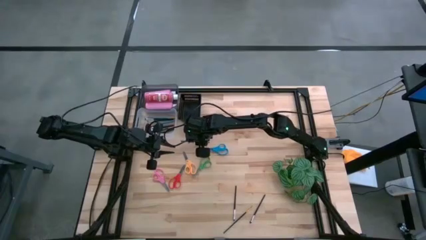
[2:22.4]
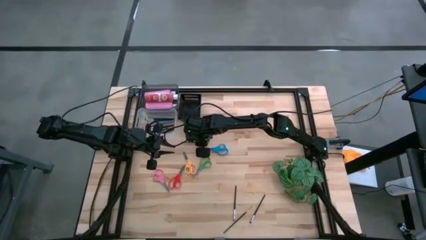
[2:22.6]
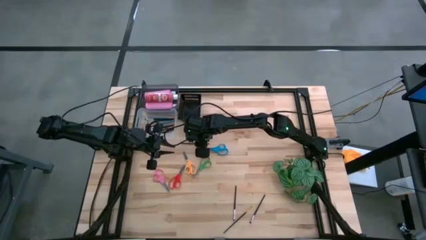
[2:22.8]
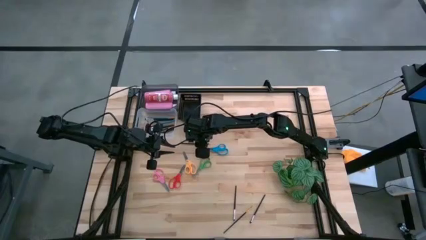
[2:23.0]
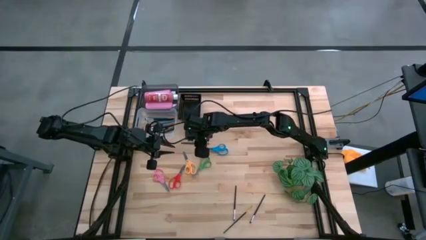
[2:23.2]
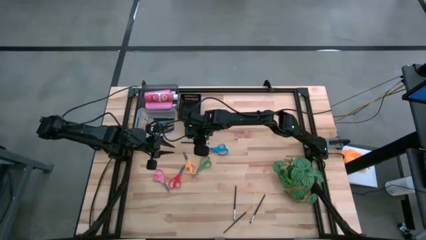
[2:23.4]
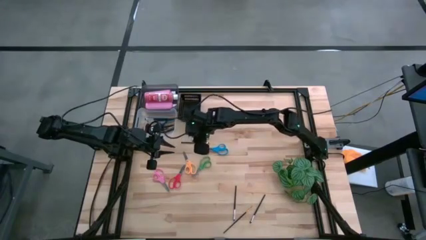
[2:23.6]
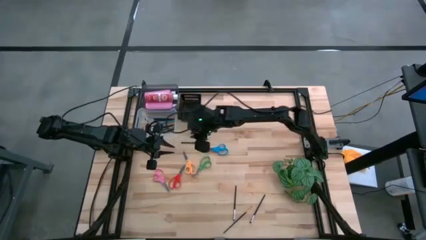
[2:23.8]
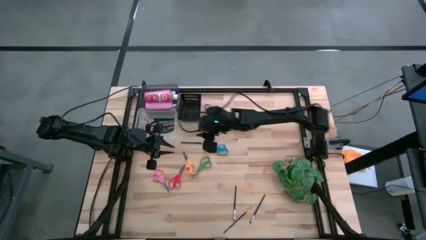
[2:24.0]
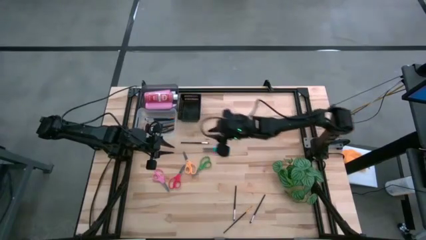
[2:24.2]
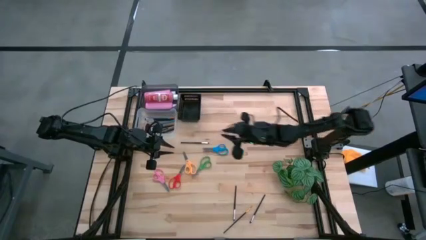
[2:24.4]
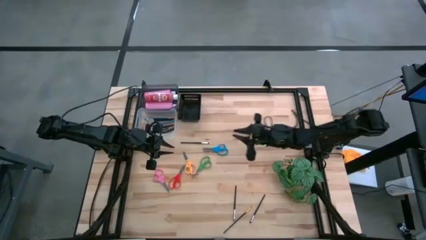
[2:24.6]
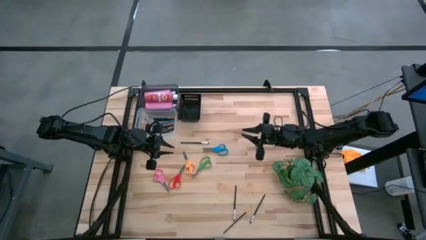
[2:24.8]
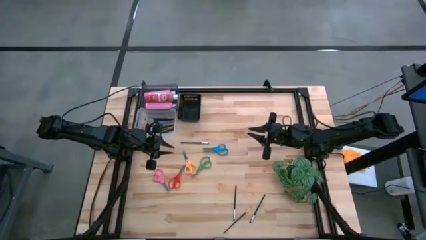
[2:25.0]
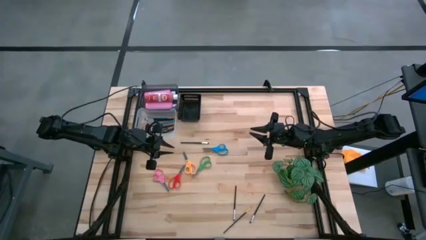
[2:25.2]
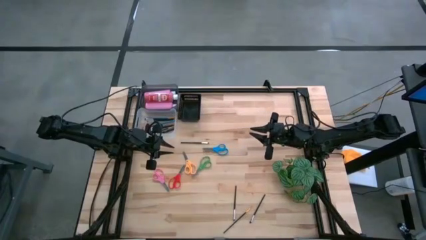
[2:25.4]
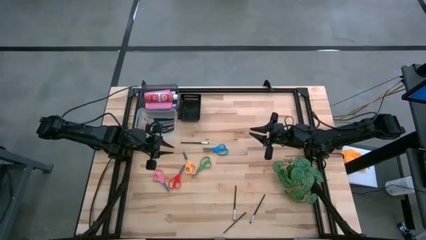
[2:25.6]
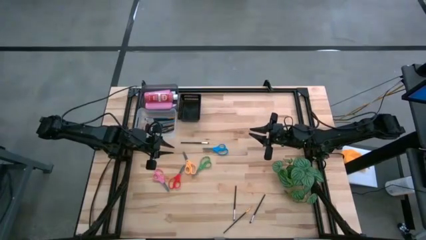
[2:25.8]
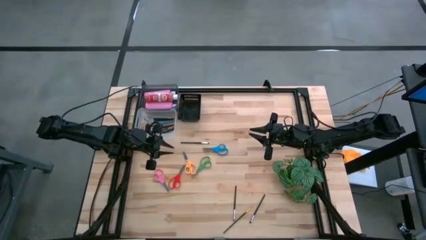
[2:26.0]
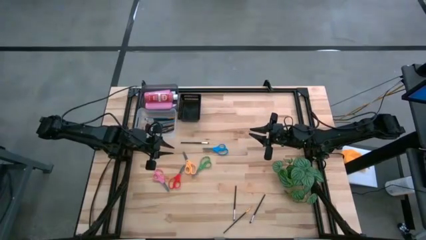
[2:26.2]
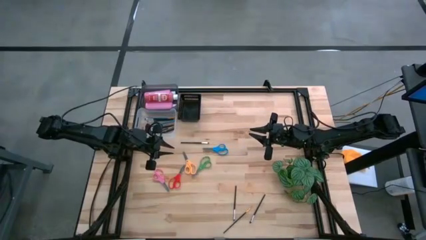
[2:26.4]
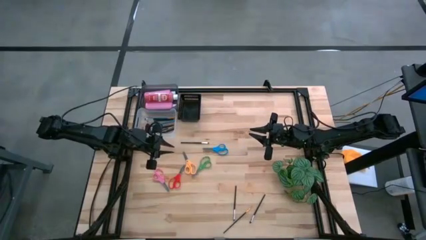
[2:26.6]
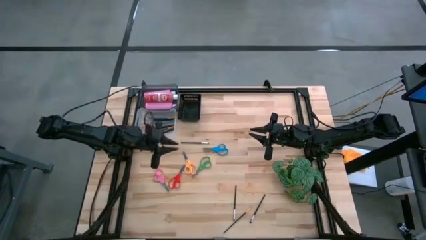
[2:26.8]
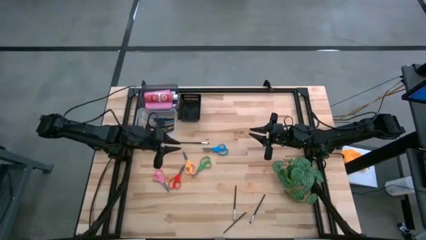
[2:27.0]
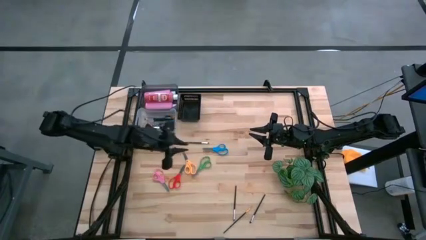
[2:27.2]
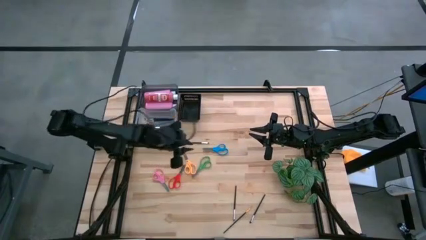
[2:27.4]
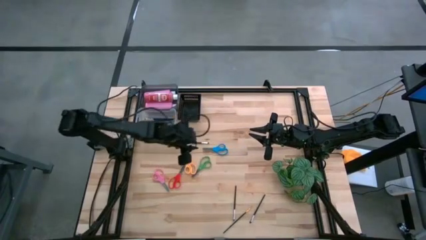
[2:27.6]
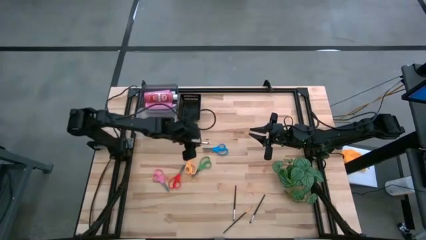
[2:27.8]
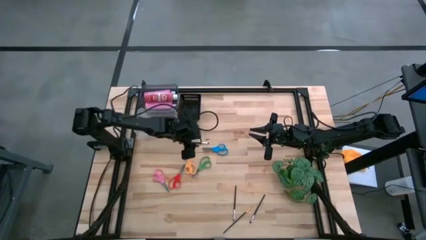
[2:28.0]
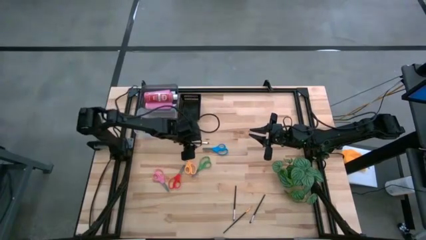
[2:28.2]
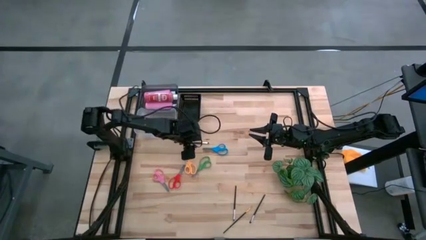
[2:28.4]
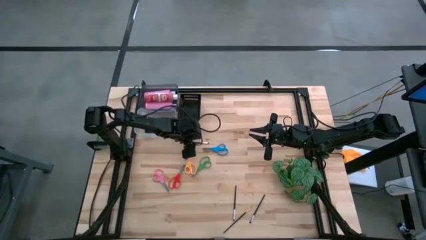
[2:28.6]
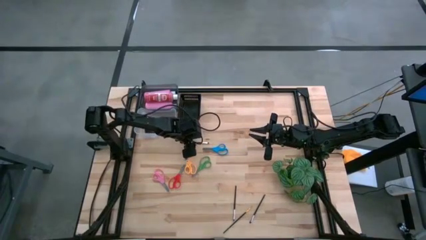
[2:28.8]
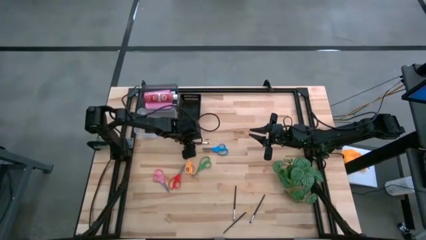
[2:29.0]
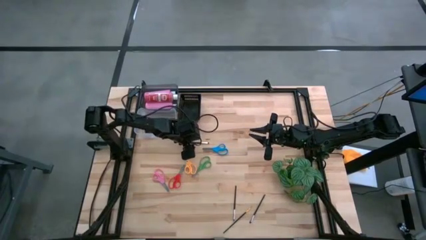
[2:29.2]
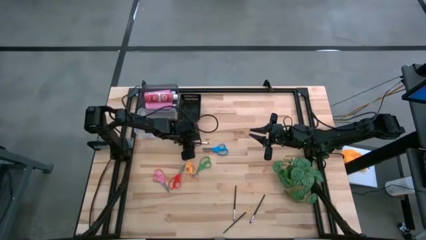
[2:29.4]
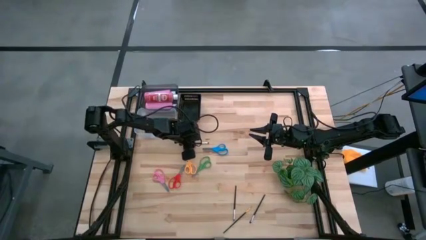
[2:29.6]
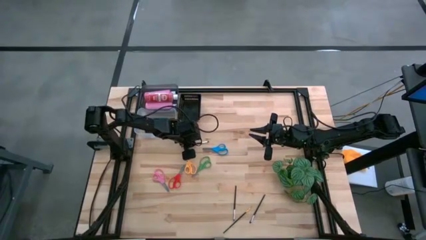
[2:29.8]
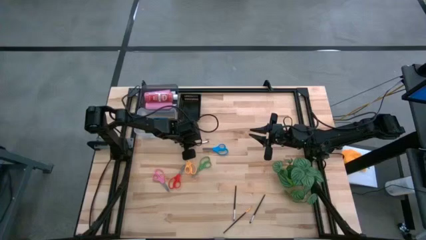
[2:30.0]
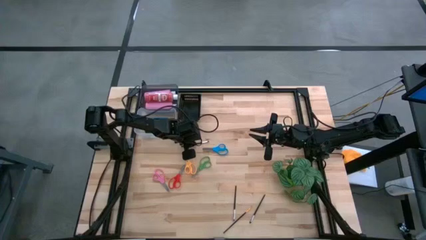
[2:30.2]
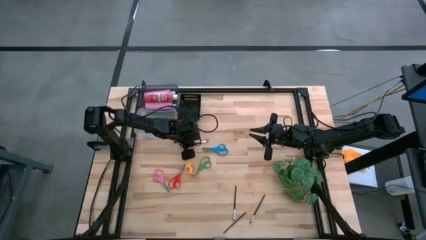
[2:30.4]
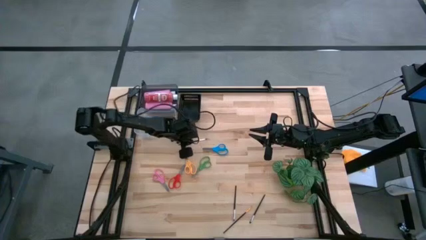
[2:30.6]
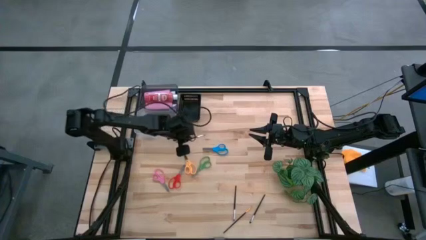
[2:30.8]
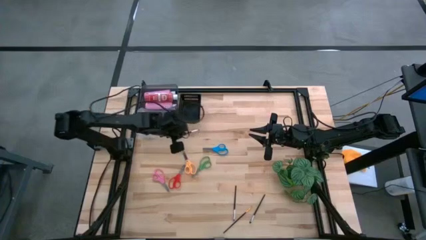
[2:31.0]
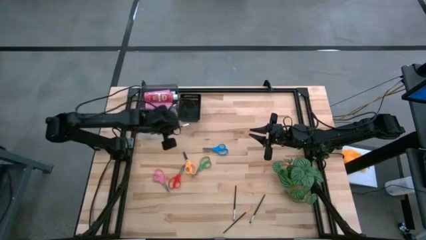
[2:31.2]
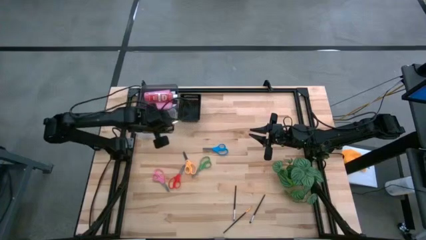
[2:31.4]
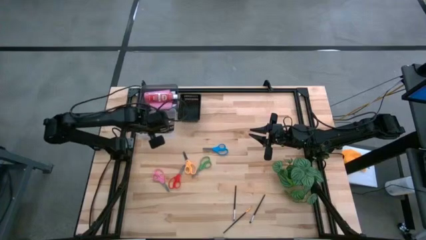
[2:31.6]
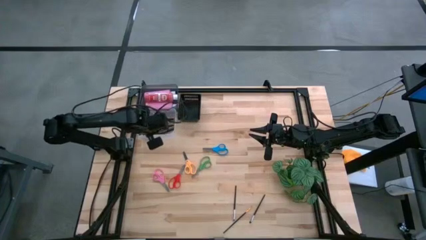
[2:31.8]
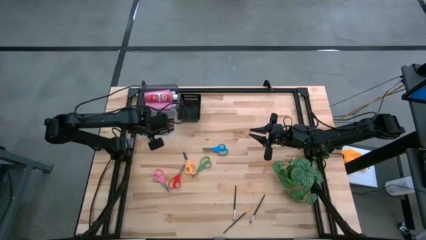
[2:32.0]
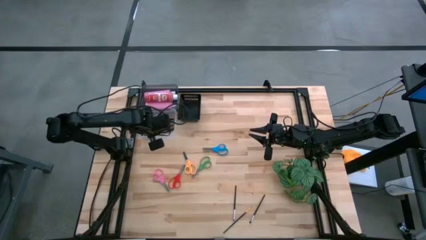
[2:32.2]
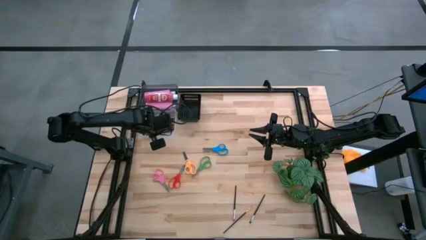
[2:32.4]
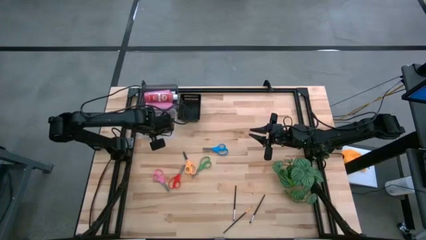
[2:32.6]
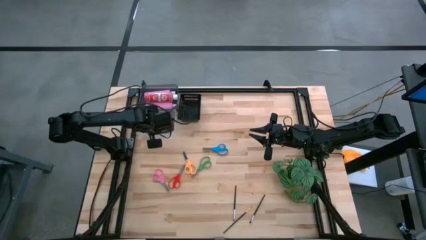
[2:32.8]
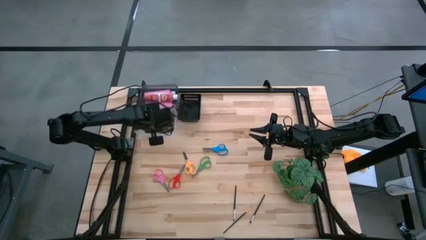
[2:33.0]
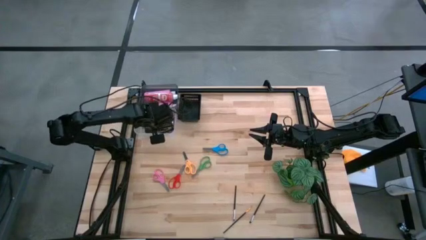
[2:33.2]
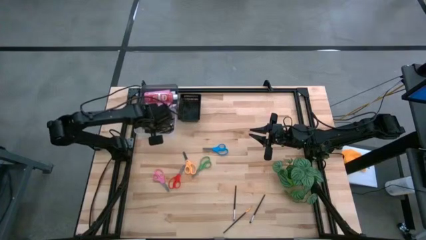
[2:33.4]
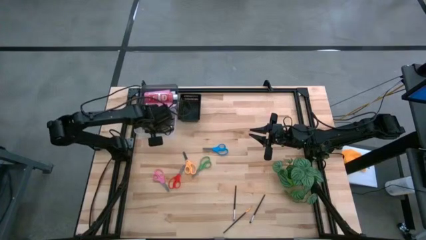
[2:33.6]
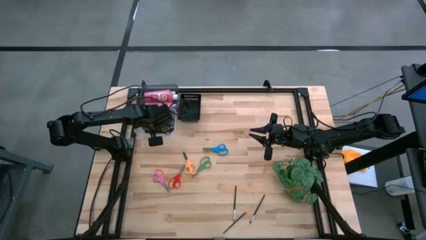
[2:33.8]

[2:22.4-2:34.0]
Task: Pick & Place Paint Supplies
Put the black paint brush into the transparent bin

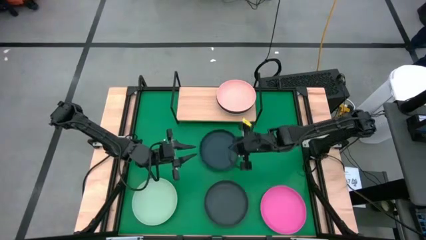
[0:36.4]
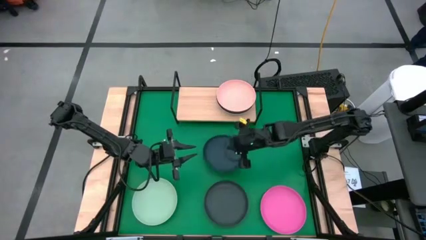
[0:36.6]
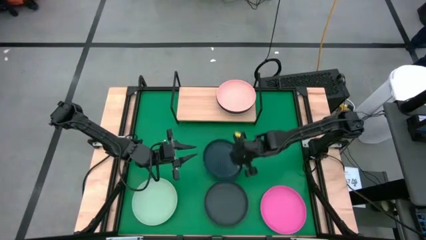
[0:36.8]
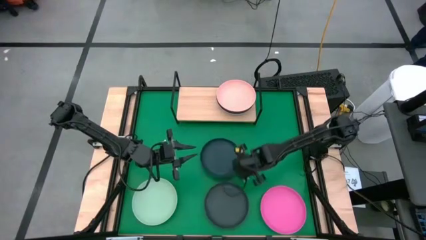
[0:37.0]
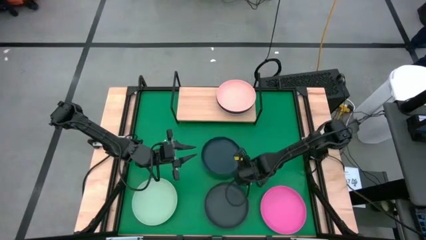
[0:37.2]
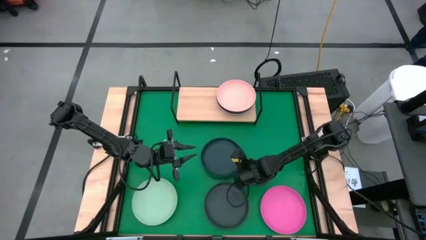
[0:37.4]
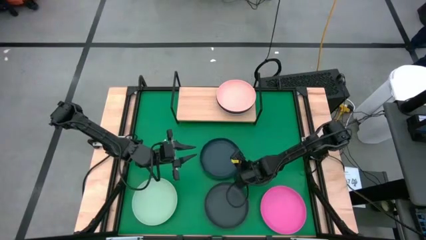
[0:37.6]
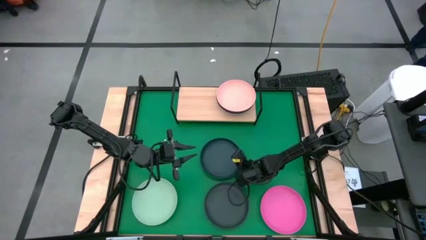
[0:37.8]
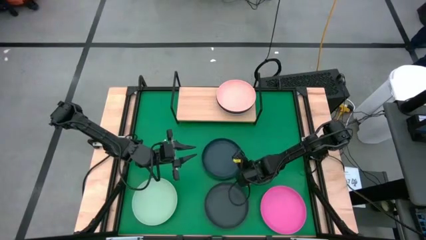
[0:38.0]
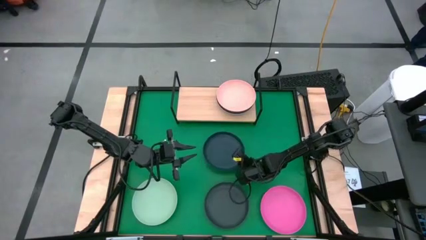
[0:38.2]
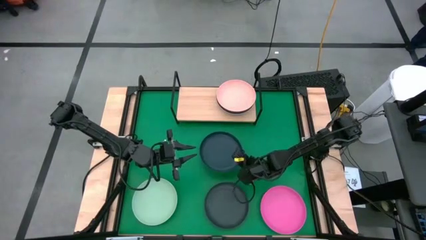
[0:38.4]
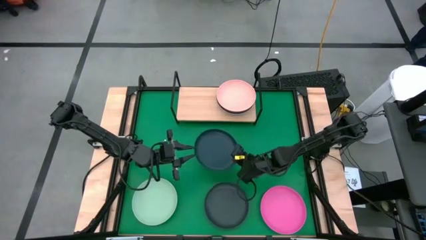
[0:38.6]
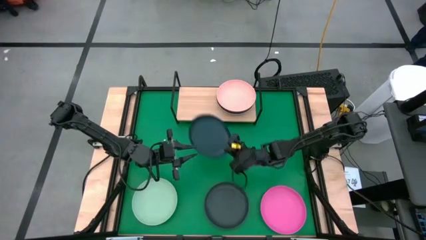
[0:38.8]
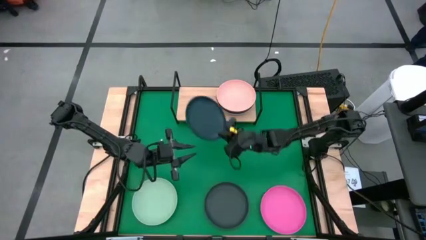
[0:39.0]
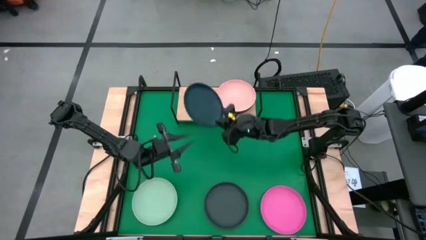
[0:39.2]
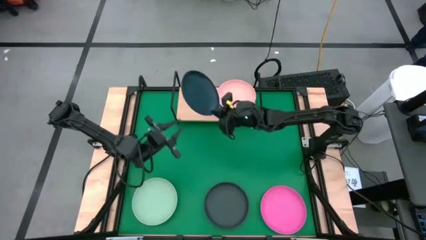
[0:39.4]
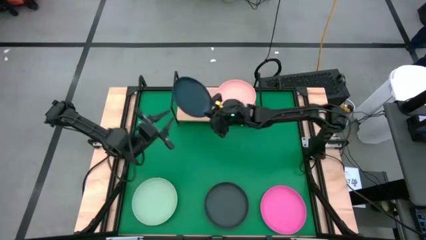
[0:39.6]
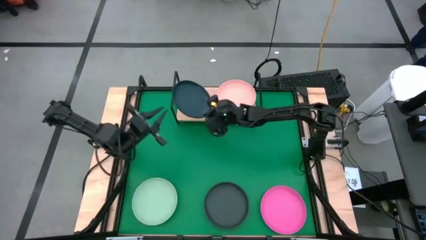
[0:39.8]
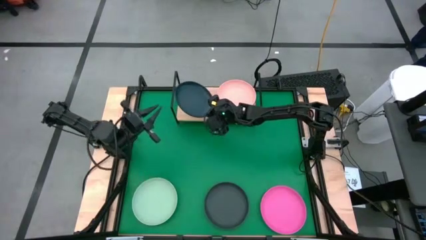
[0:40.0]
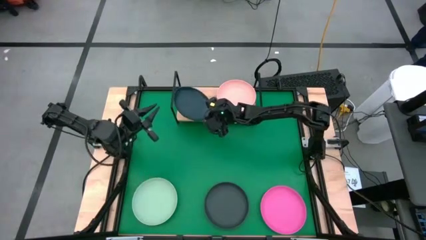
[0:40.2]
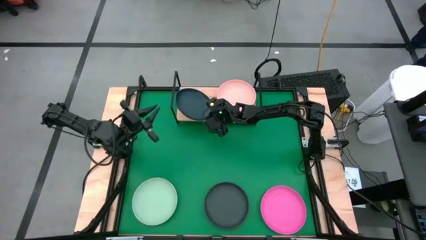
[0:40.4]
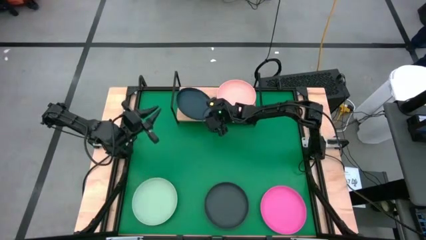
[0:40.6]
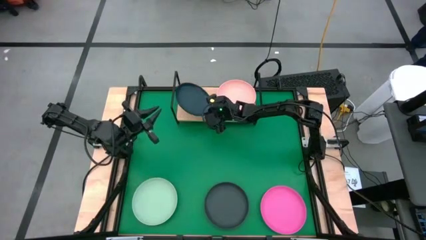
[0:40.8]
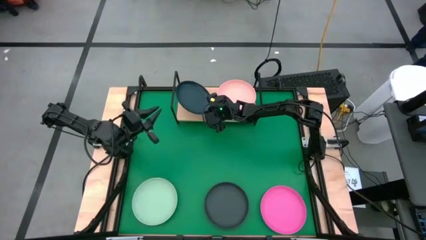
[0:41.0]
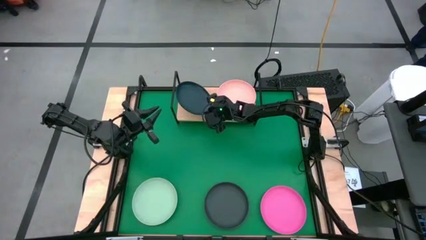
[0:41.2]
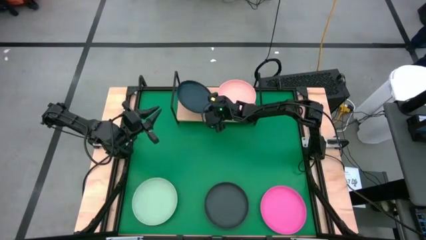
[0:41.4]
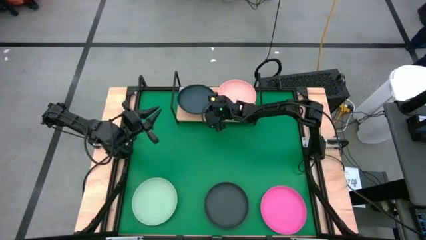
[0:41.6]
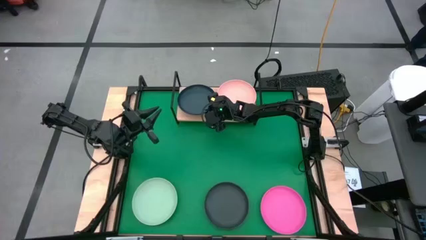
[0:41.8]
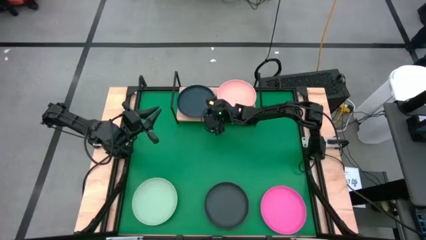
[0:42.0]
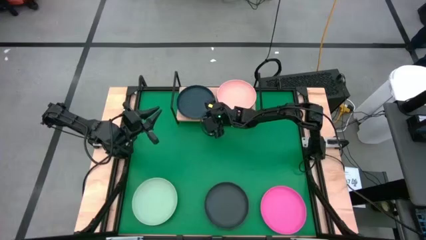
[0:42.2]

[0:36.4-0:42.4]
Task: Place and stack plates onto a shelf
Put the dark green plate on the shelf
